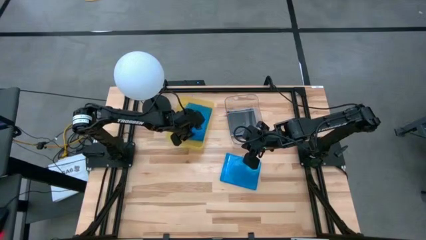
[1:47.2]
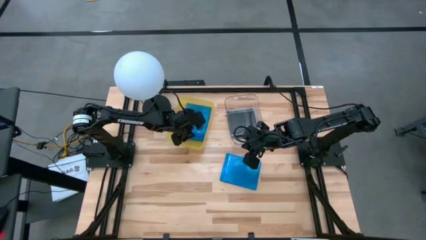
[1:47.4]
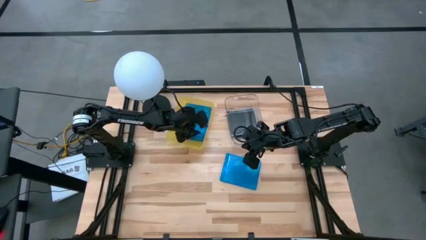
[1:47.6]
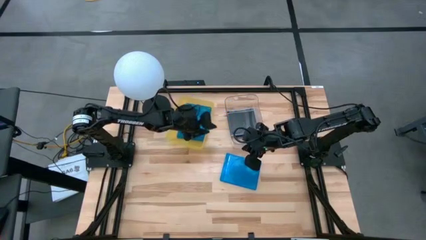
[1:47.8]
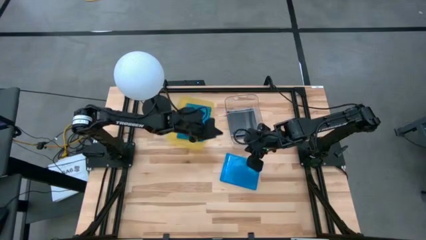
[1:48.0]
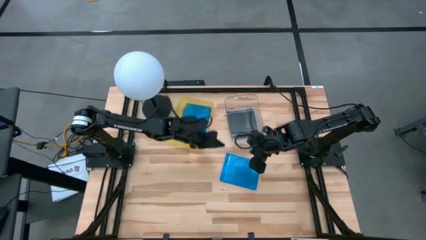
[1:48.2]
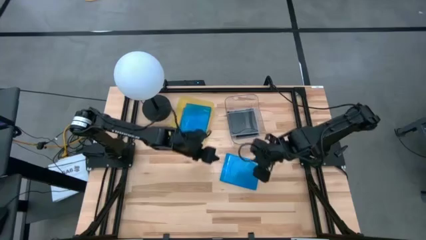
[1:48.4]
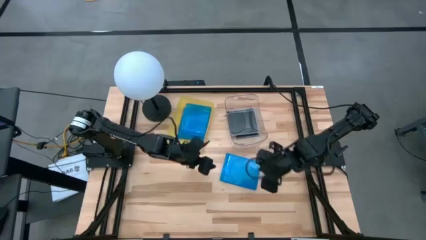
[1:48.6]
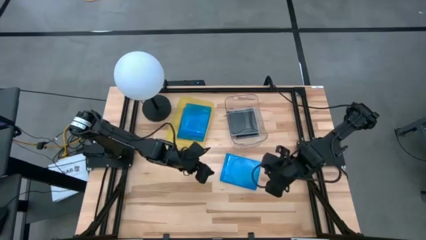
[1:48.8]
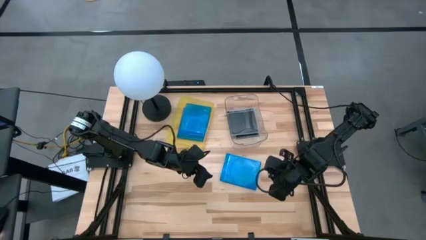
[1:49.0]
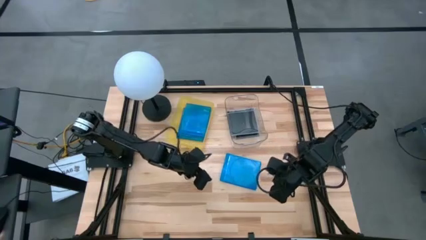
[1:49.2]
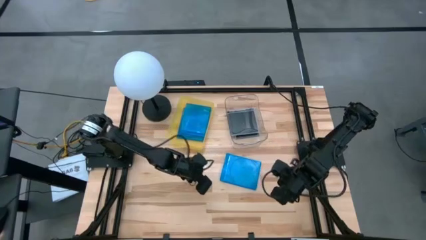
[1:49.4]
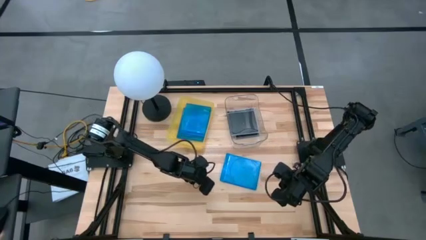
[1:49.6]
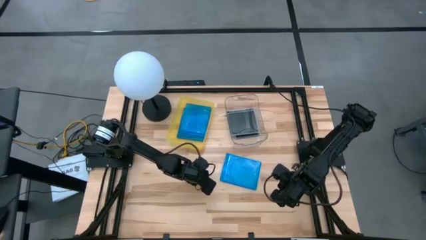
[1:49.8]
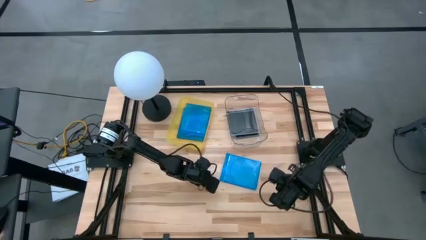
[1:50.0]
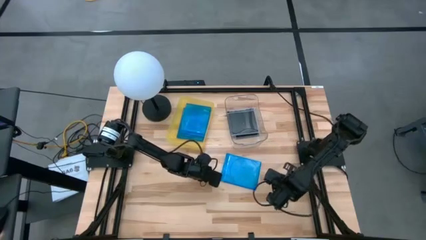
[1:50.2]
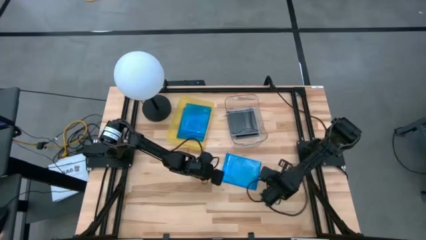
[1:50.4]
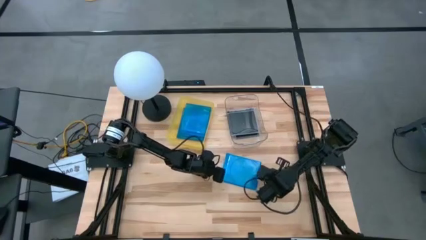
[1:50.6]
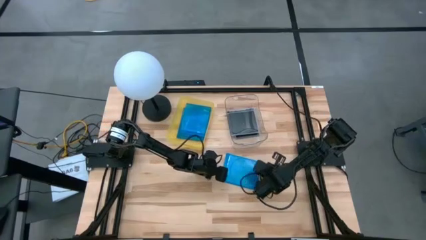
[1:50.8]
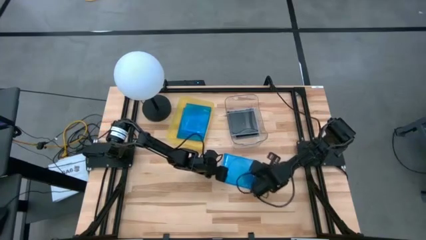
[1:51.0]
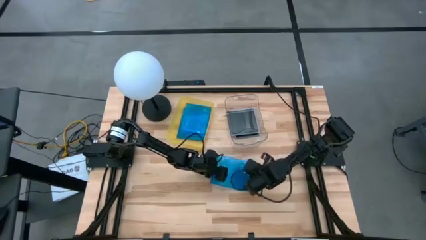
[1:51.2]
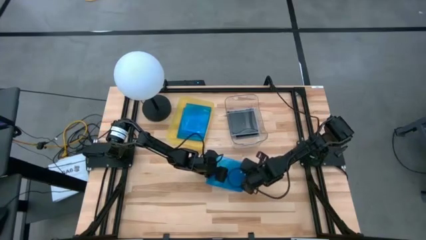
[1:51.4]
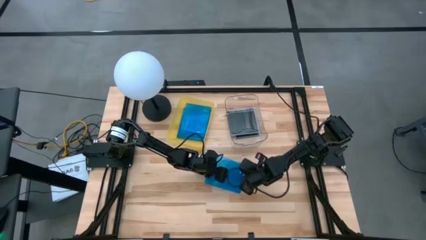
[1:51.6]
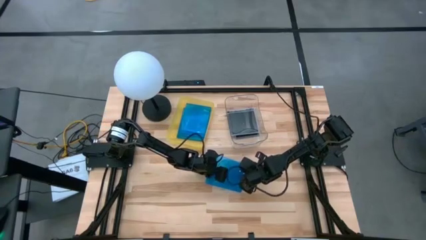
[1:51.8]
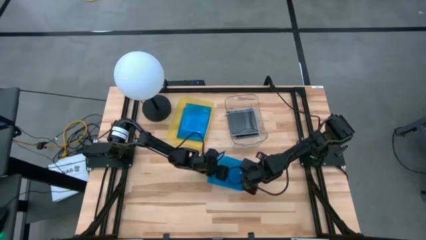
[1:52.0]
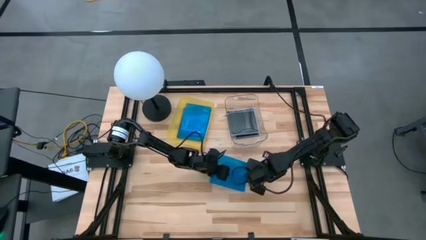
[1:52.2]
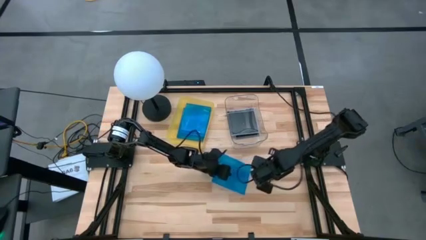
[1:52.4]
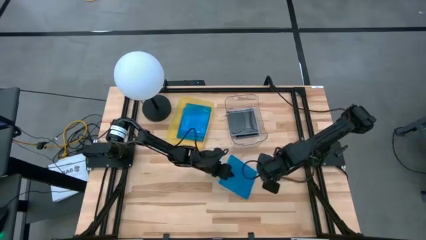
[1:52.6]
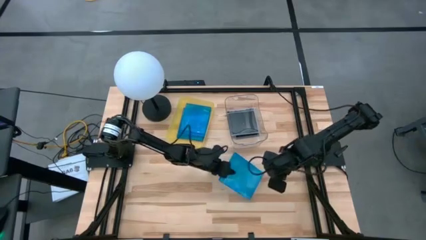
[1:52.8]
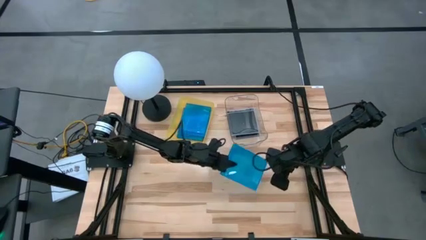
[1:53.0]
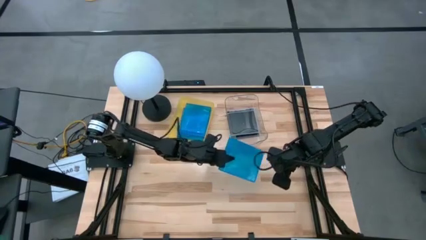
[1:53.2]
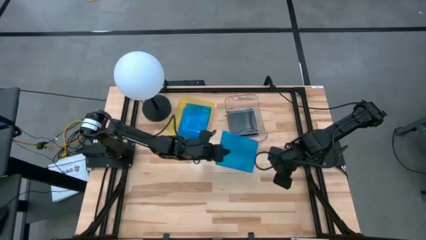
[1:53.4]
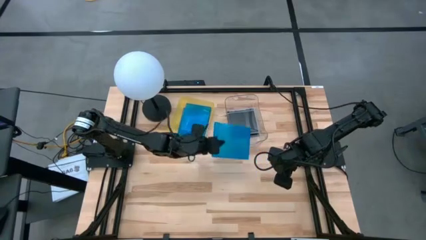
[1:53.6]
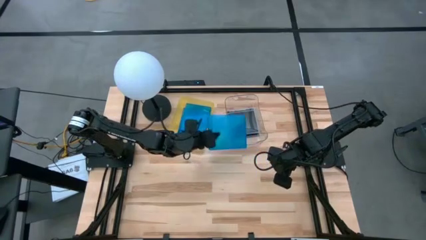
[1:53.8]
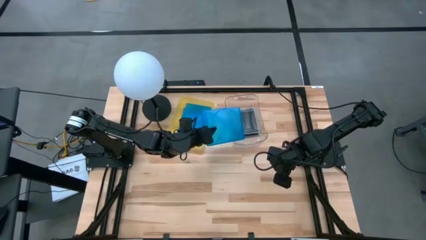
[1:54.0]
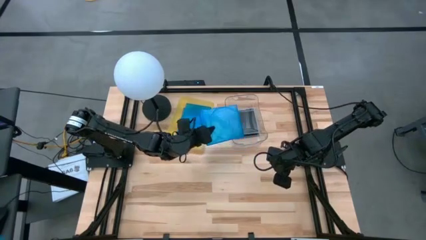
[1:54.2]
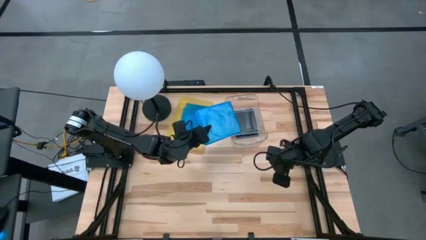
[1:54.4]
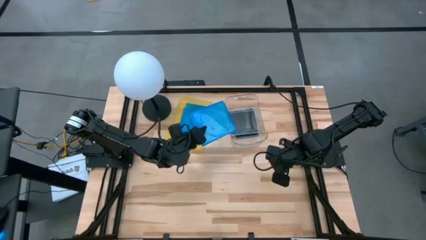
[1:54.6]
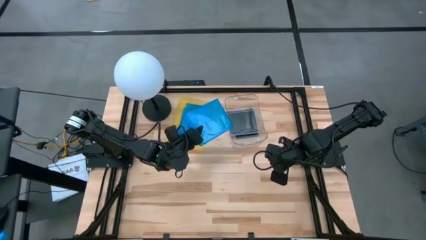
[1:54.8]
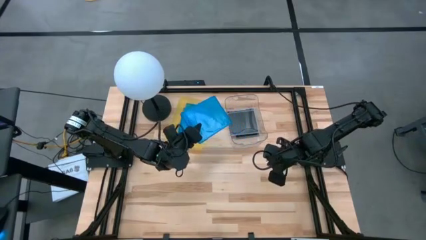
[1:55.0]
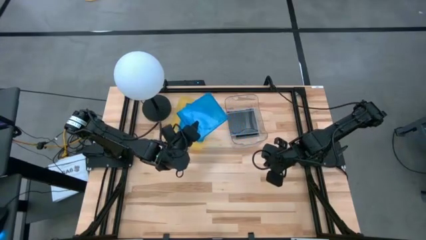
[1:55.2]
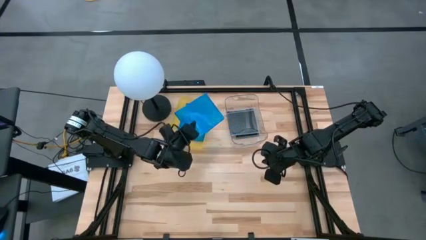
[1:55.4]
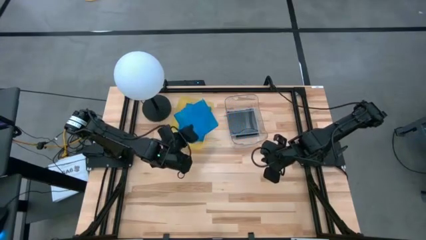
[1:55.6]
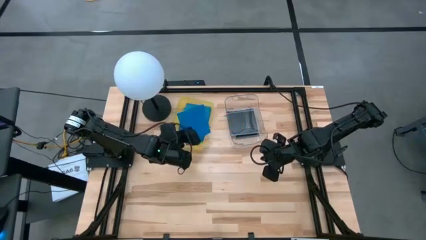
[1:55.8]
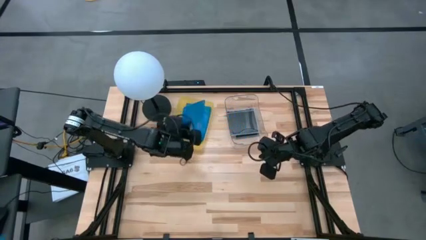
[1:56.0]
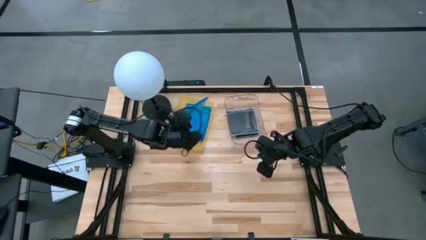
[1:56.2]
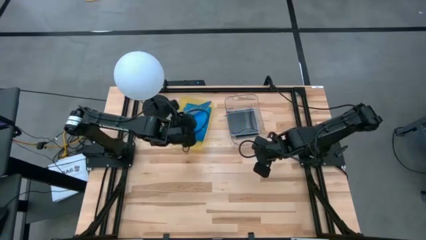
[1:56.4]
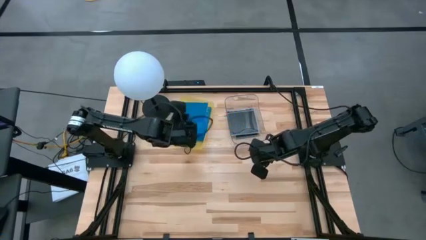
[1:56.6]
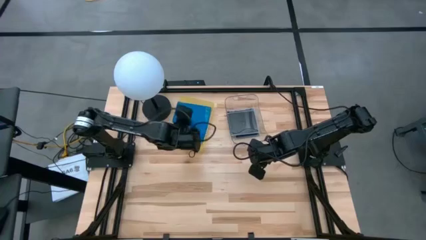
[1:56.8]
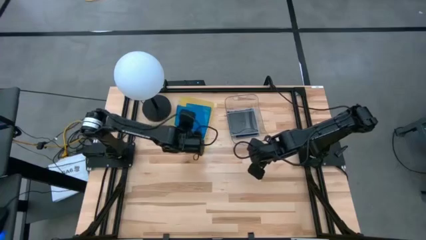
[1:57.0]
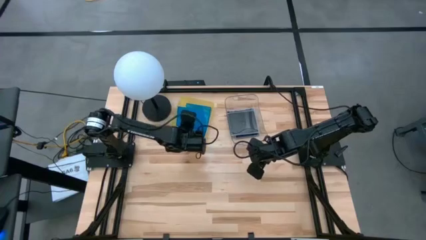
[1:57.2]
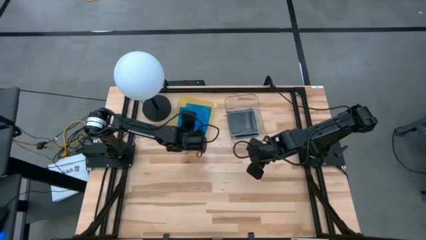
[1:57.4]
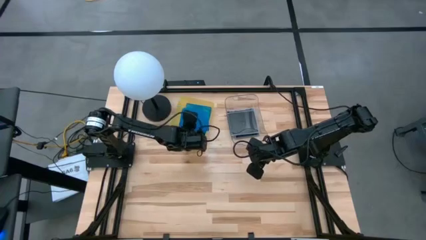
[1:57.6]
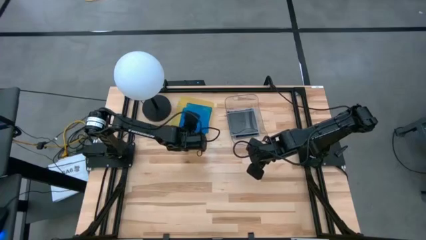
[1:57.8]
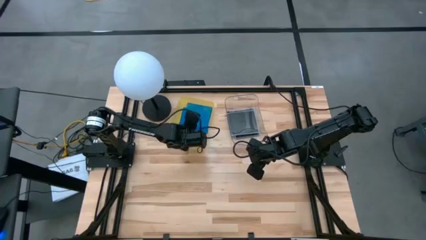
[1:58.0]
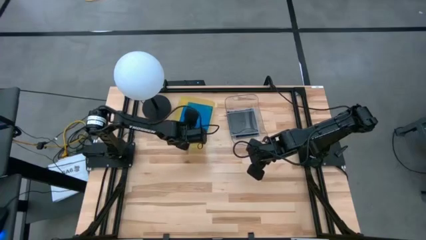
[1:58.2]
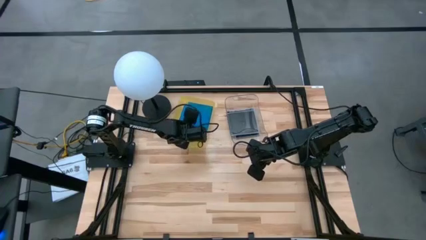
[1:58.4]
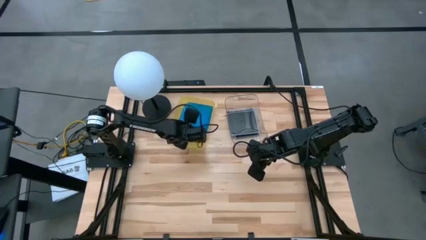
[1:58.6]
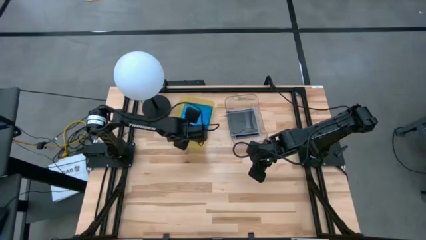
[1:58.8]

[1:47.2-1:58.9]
Task: Pick & place jewel cases by type
Put the blue CD case into the yellow bin

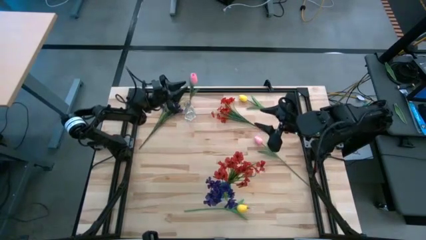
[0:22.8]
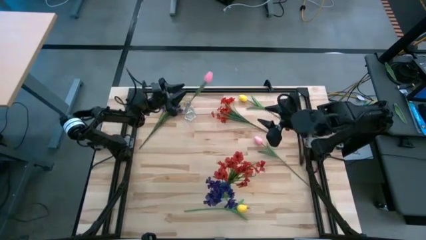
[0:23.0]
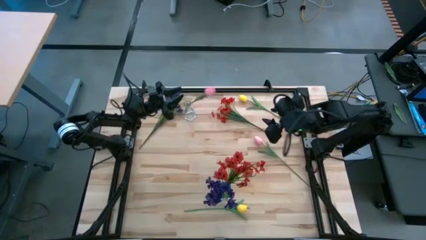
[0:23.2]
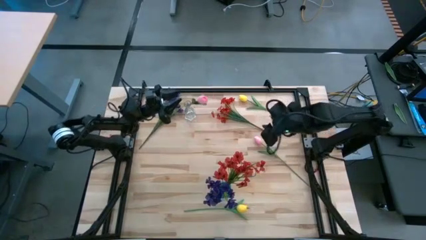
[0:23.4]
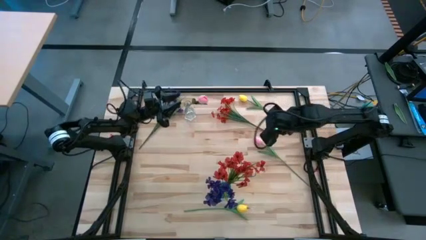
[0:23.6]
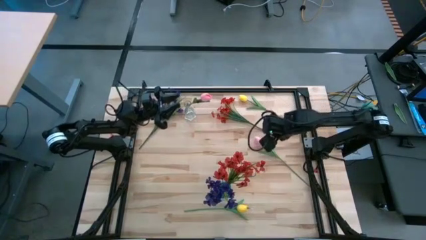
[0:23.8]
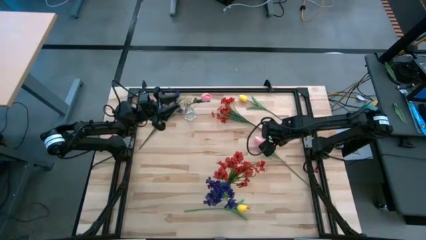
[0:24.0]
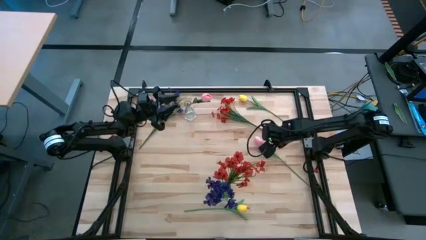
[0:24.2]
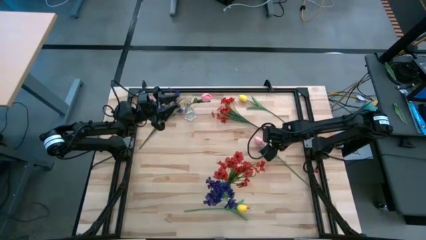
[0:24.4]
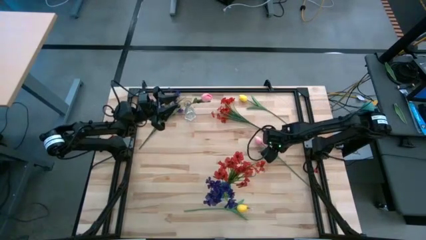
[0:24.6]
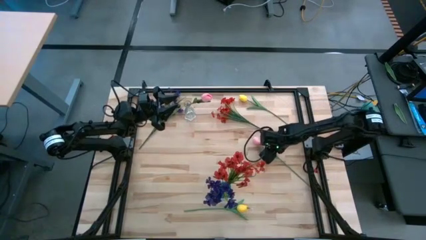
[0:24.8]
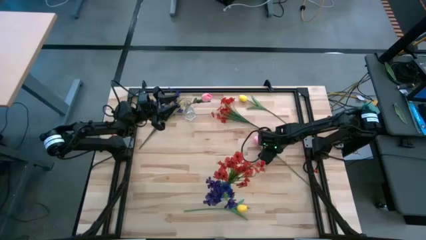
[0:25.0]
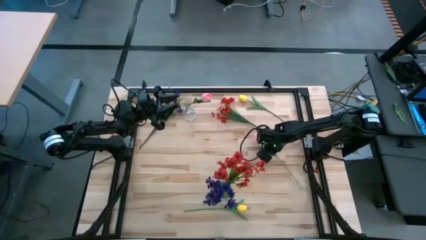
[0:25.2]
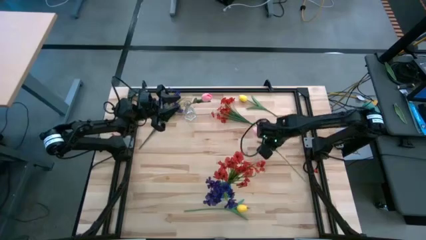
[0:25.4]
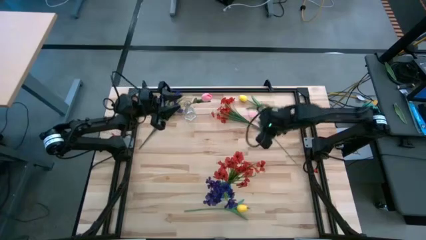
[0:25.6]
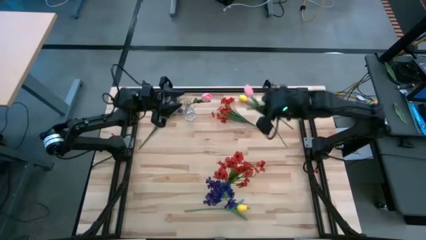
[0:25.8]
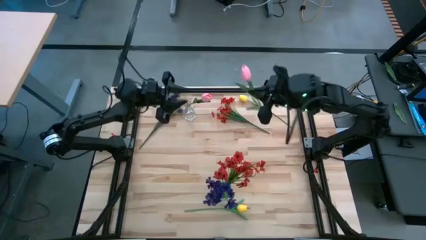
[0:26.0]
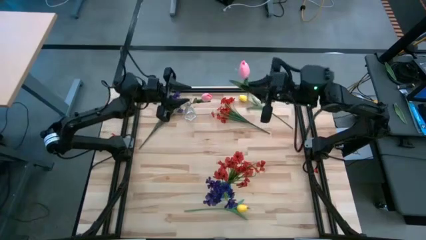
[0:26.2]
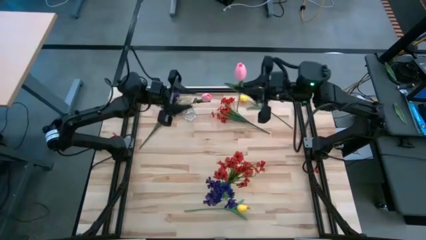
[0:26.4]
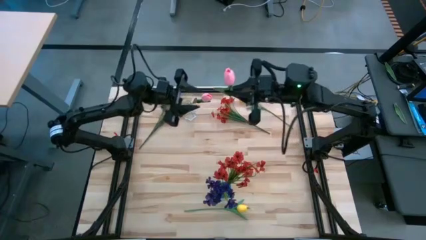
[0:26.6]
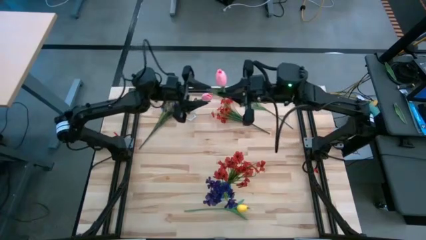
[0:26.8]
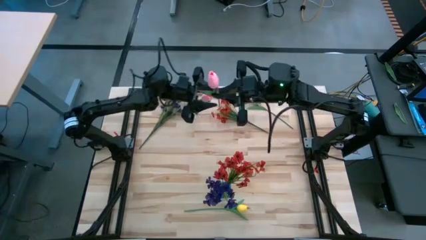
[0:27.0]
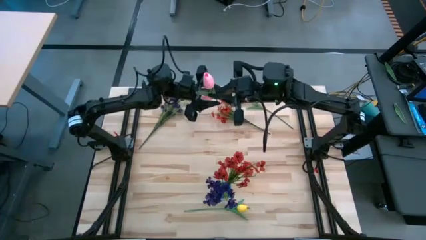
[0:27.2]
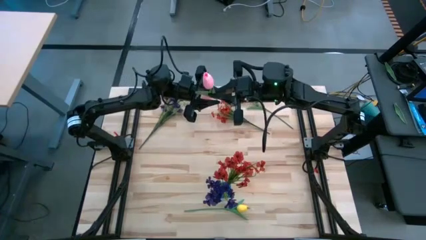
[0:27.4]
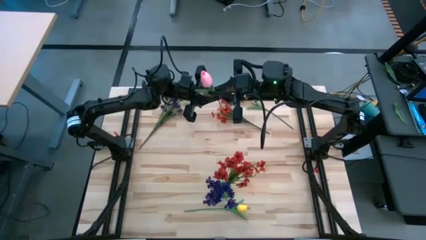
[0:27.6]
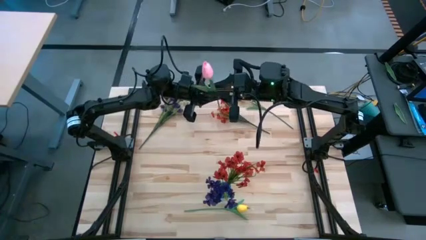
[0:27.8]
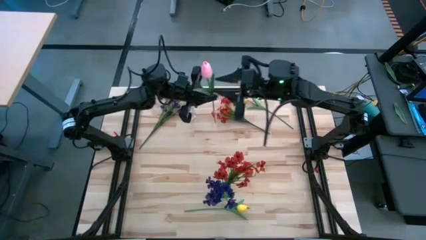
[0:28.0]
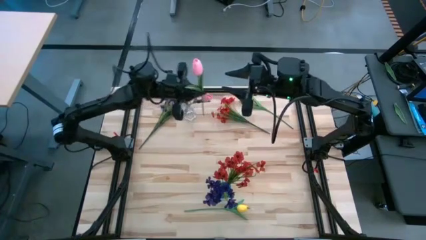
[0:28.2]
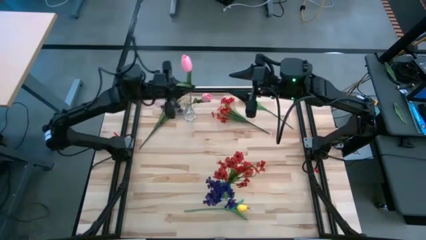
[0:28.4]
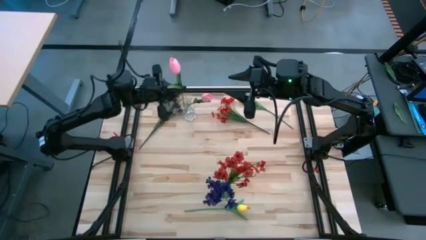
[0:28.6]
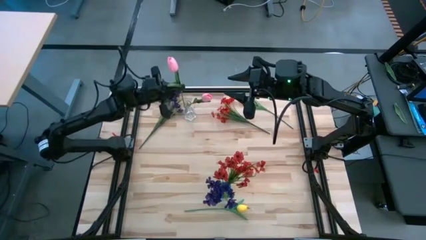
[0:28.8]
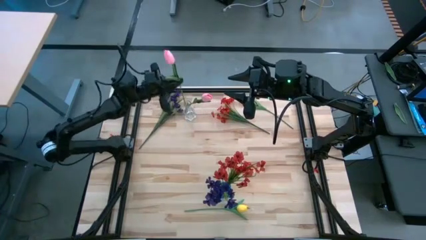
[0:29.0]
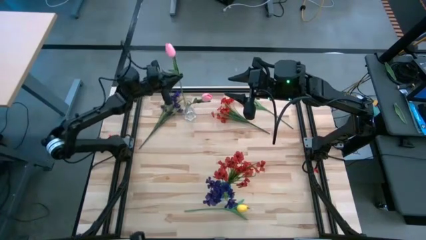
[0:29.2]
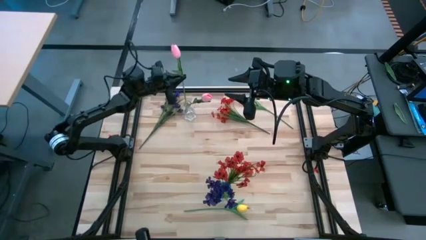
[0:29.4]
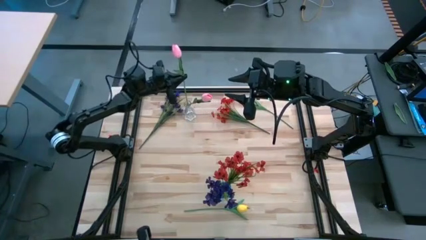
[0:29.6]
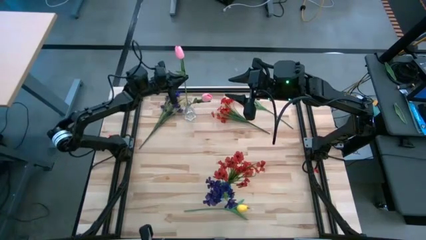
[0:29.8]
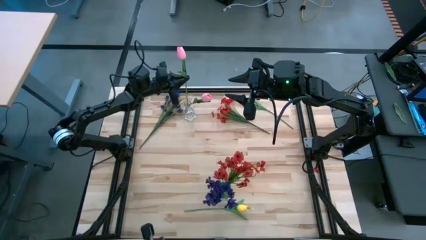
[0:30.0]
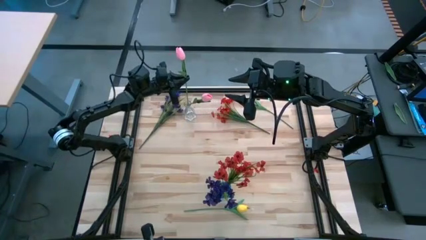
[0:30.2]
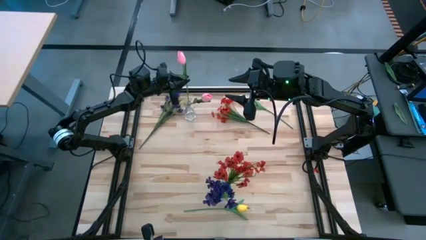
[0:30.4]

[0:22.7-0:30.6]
Task: Sort flowers into vase by color
Put the pink flowers into the transparent vase
